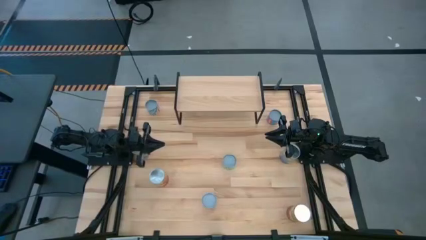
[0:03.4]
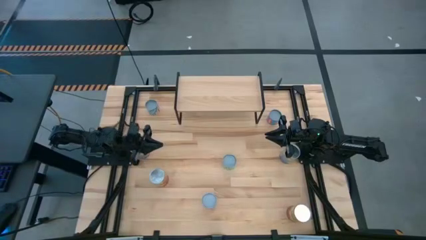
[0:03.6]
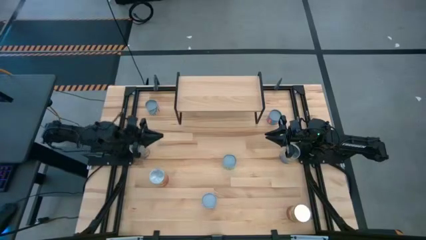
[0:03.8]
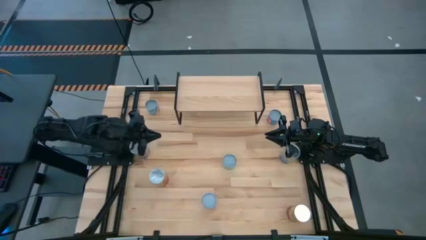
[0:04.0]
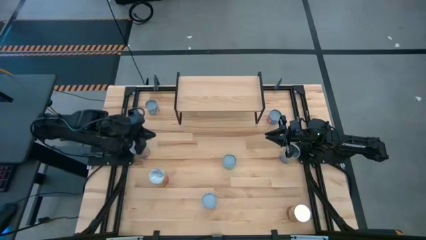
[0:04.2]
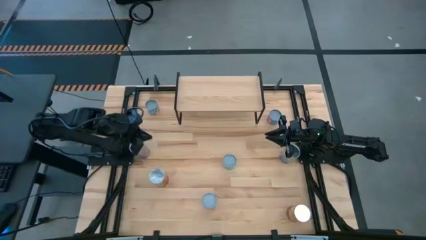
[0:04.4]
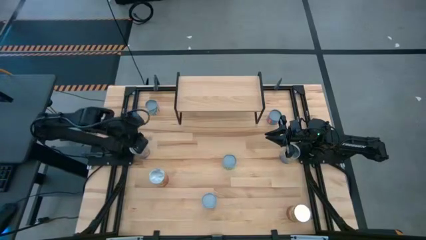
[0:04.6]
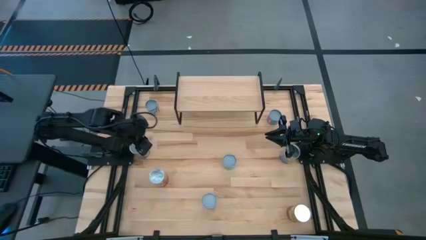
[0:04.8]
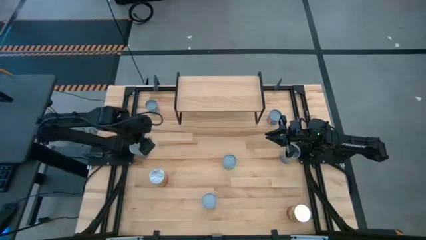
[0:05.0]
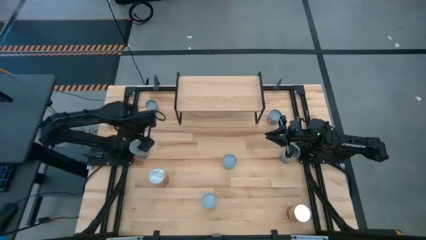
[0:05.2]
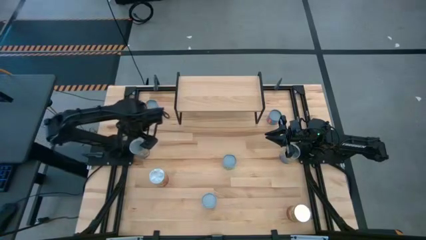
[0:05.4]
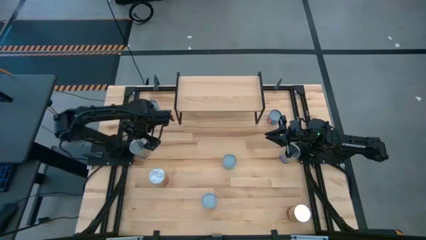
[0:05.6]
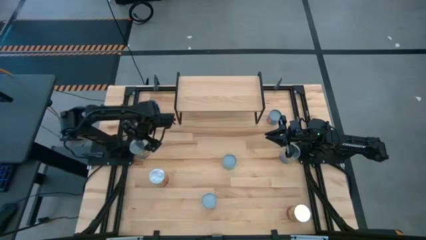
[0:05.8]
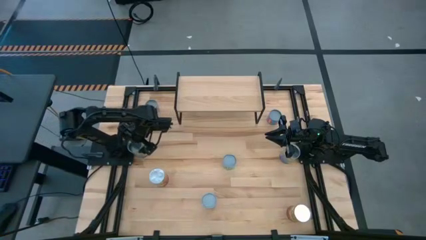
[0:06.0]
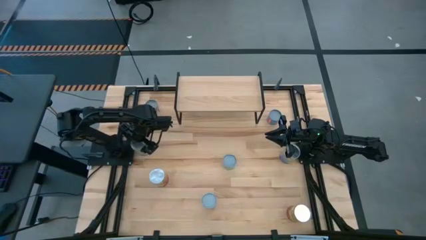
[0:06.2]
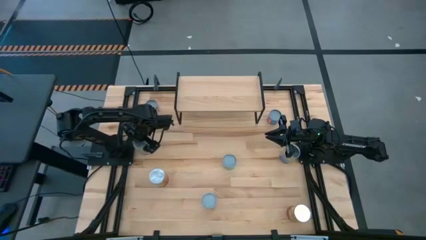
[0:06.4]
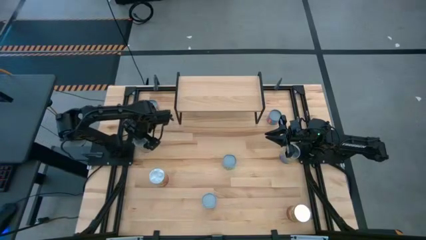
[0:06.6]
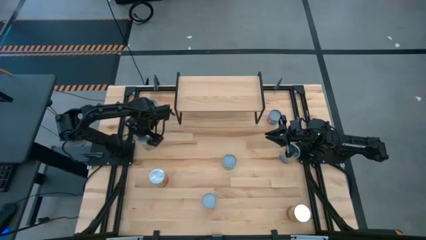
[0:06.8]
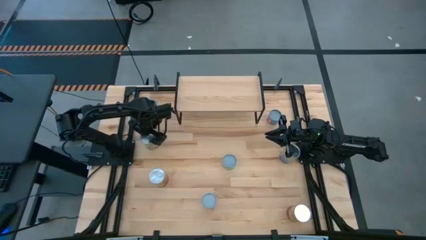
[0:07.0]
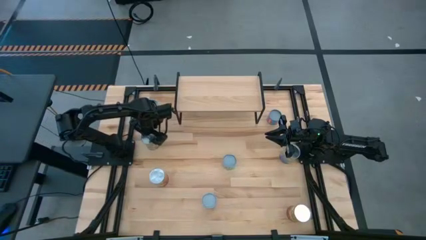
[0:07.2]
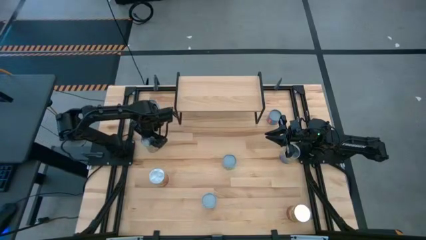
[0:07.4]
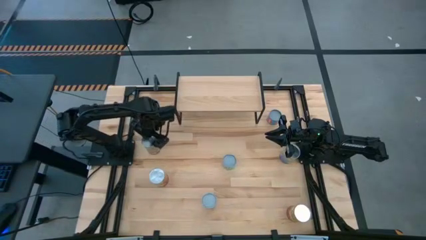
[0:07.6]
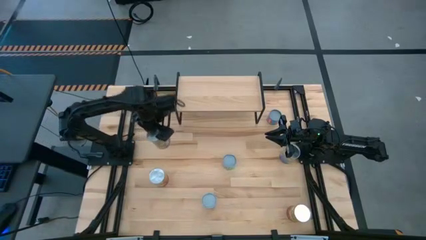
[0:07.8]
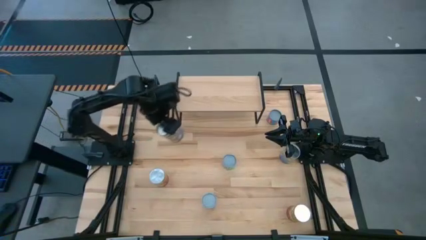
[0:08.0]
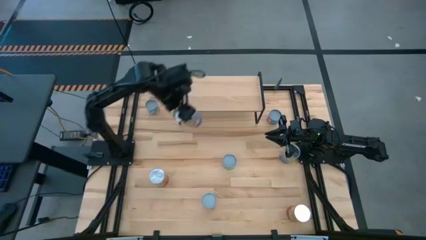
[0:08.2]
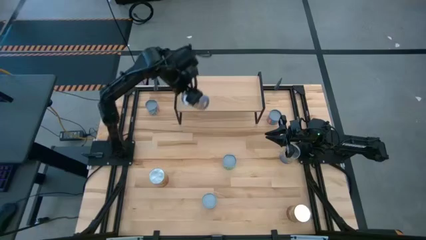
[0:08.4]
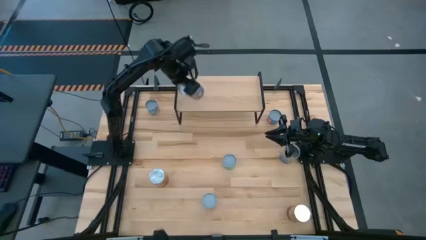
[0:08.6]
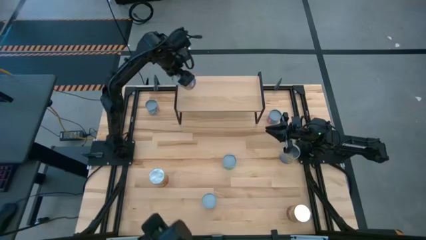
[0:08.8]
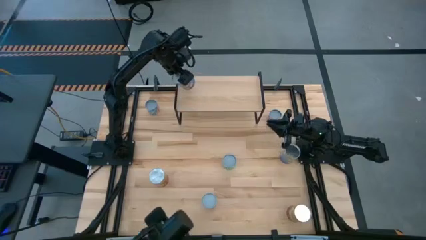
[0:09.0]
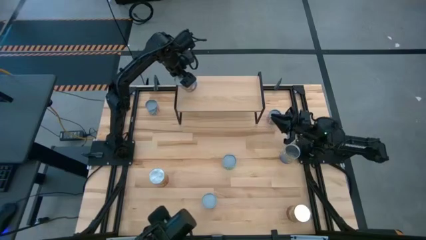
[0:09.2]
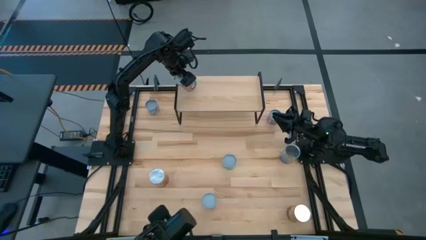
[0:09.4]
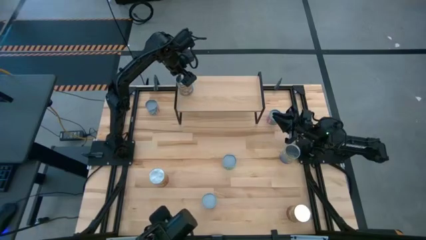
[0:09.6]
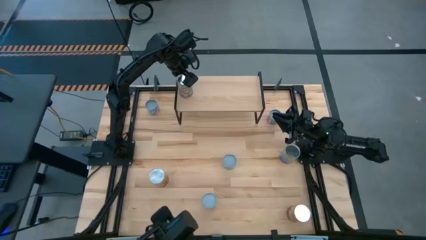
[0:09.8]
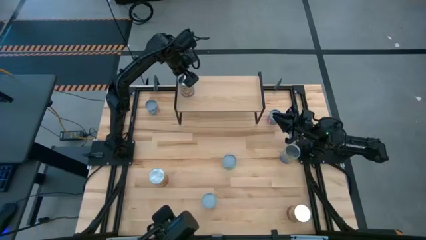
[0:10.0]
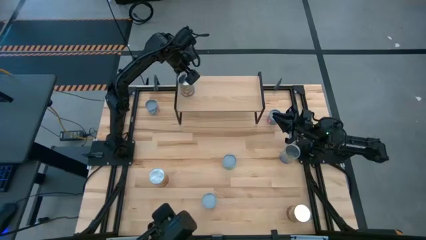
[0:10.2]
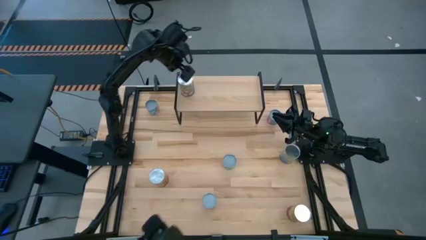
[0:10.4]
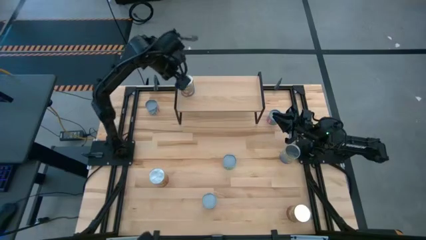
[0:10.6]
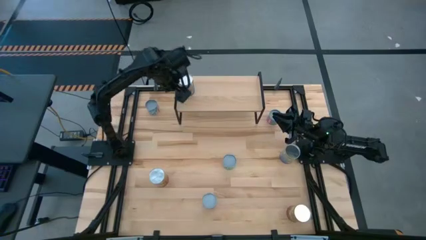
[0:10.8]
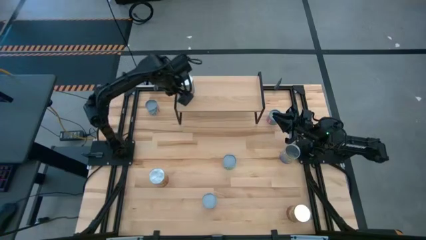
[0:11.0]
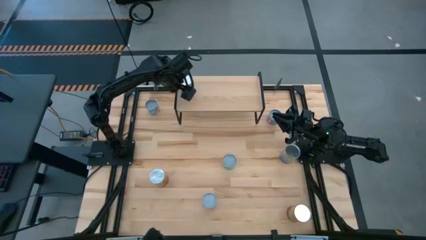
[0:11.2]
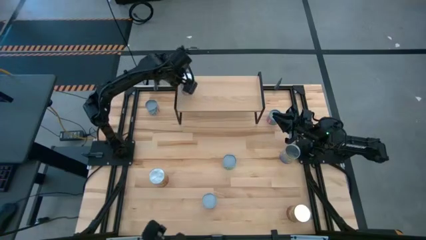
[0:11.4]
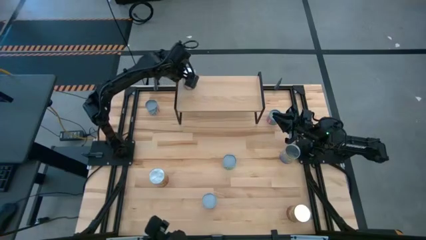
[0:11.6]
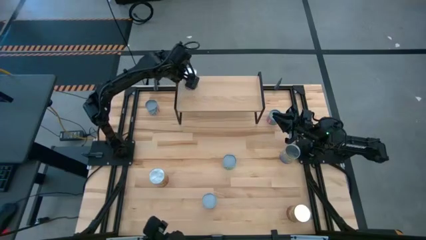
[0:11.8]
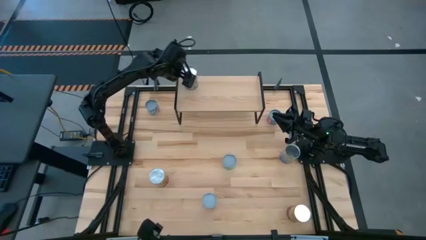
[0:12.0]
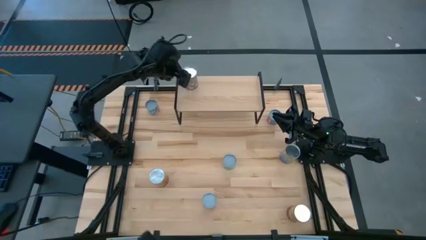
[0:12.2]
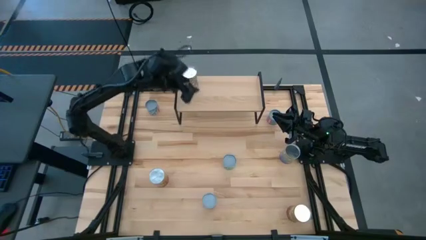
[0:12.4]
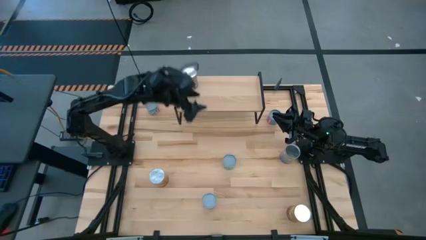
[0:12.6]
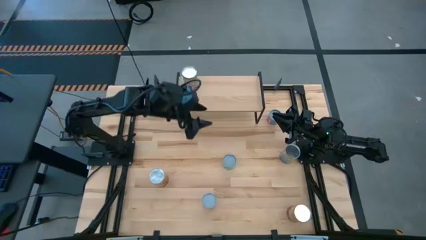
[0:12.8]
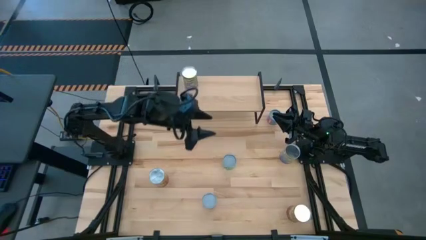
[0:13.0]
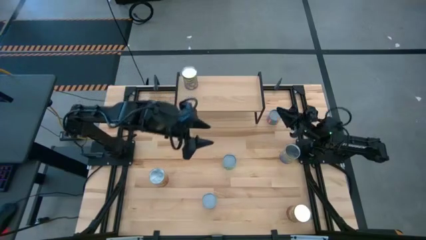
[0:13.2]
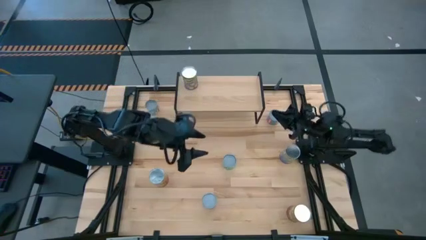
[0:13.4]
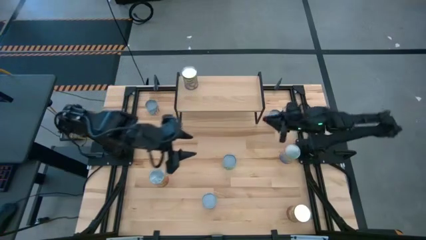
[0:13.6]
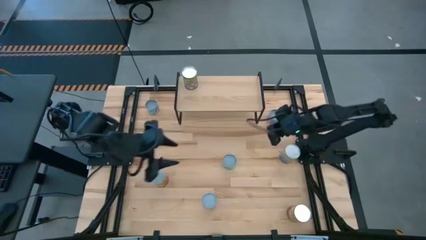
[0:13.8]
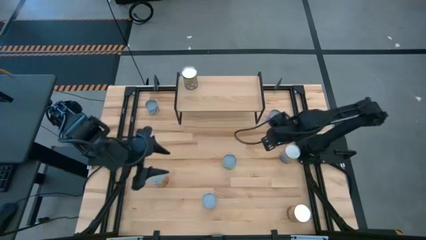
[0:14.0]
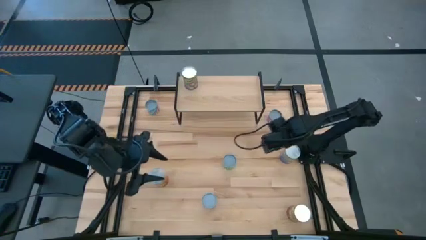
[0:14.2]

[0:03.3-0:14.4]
Task: Pick and place cans onto a shelf
Put the top left peach can on top of the shelf
